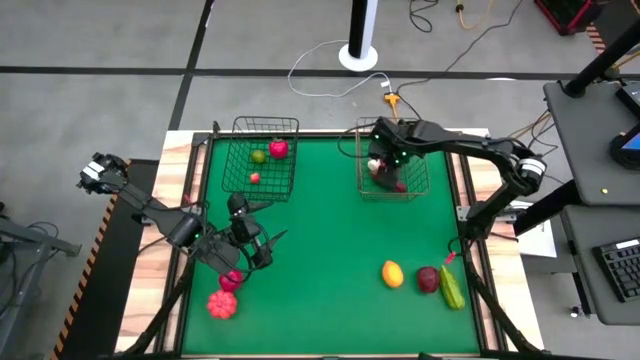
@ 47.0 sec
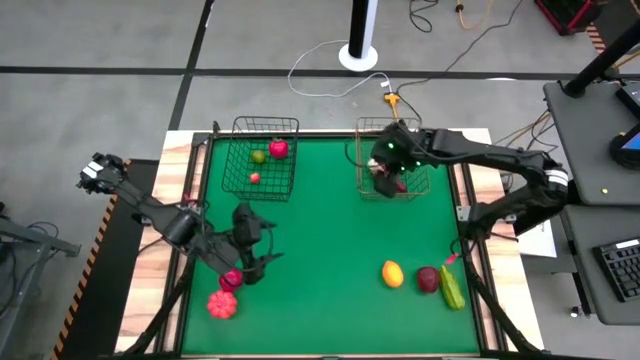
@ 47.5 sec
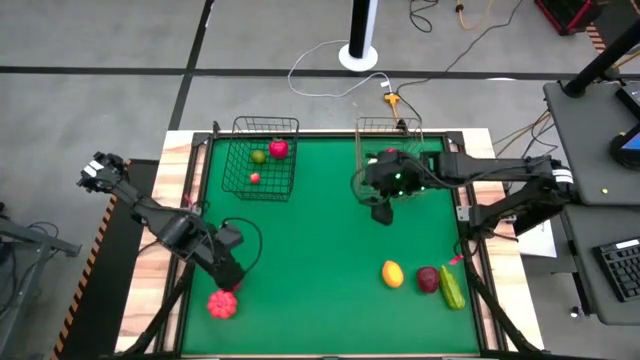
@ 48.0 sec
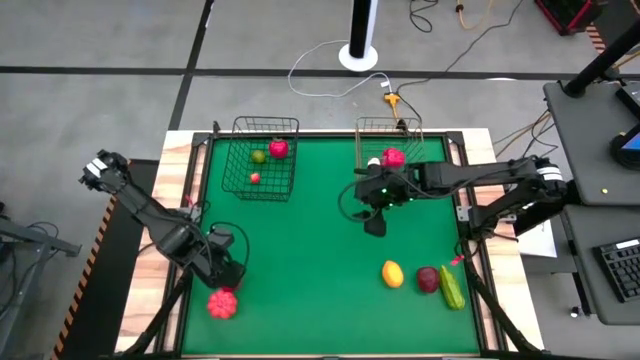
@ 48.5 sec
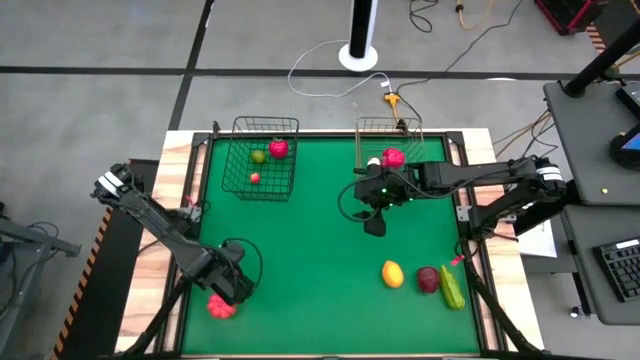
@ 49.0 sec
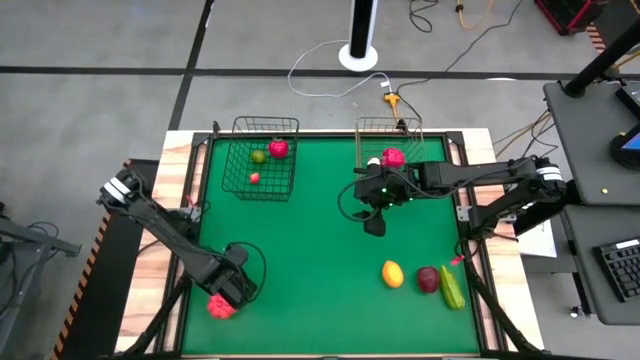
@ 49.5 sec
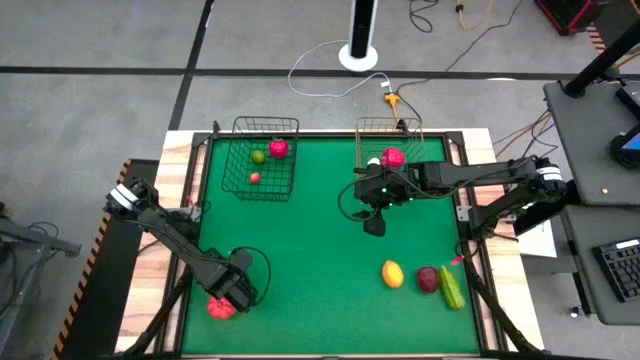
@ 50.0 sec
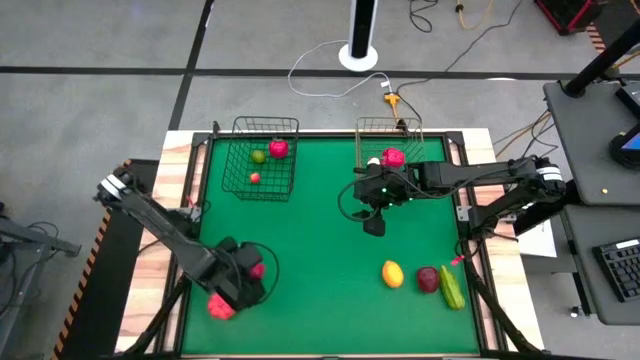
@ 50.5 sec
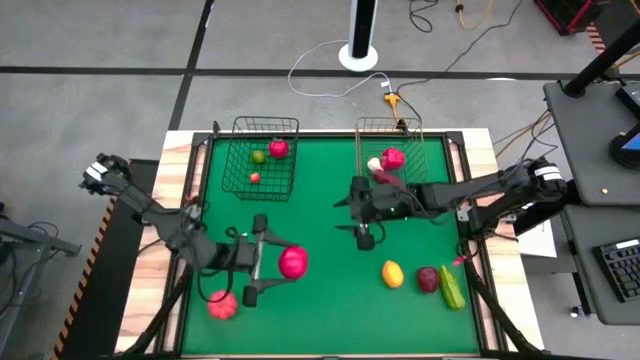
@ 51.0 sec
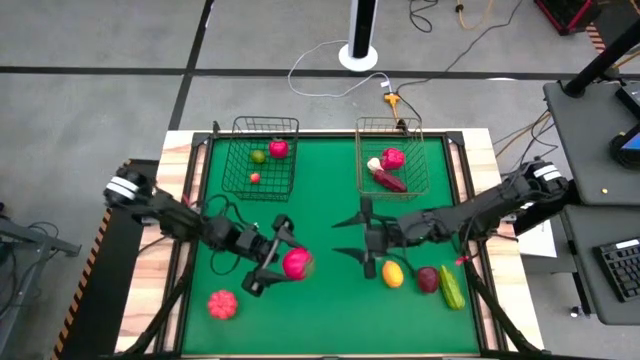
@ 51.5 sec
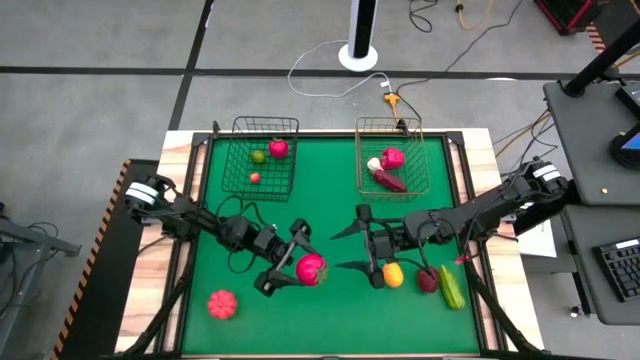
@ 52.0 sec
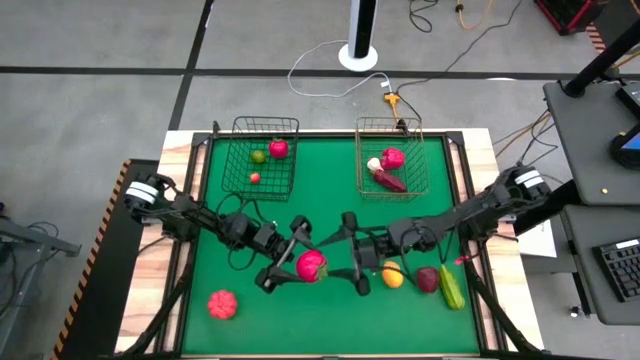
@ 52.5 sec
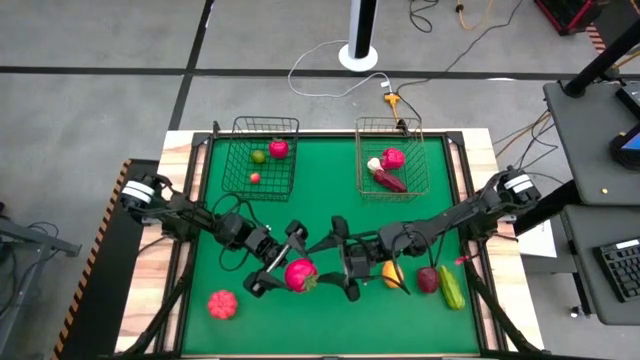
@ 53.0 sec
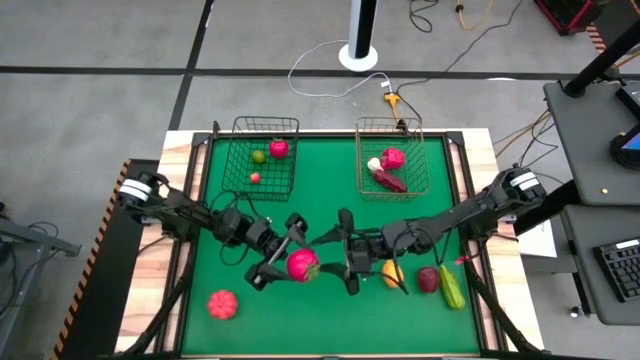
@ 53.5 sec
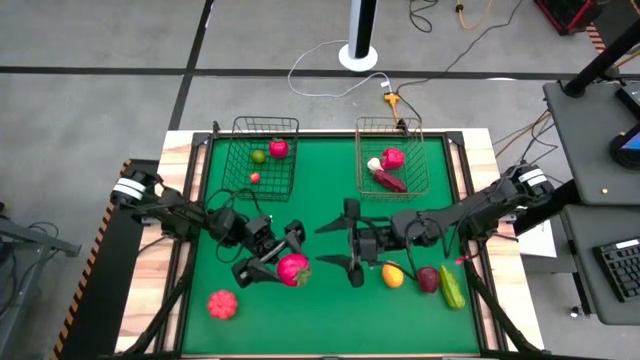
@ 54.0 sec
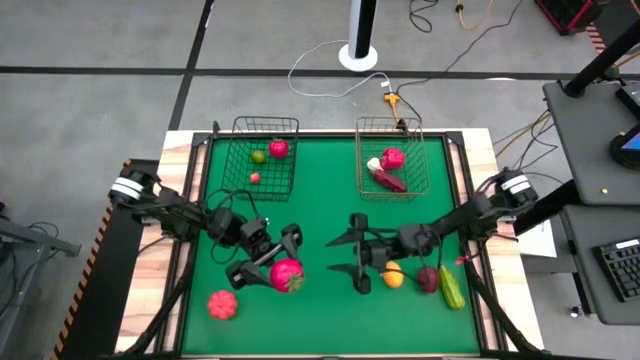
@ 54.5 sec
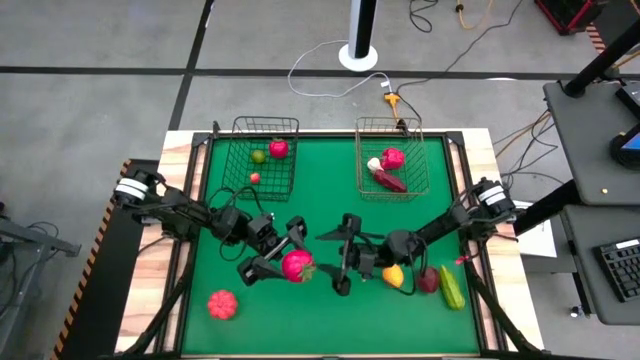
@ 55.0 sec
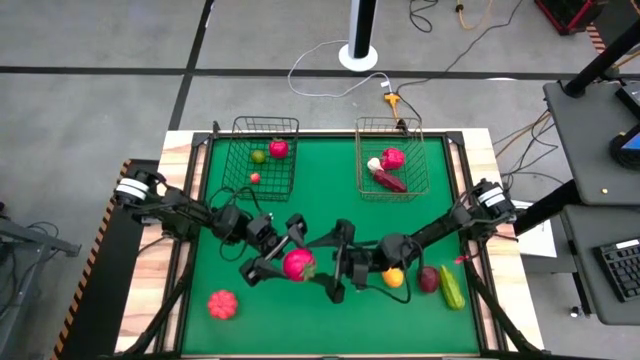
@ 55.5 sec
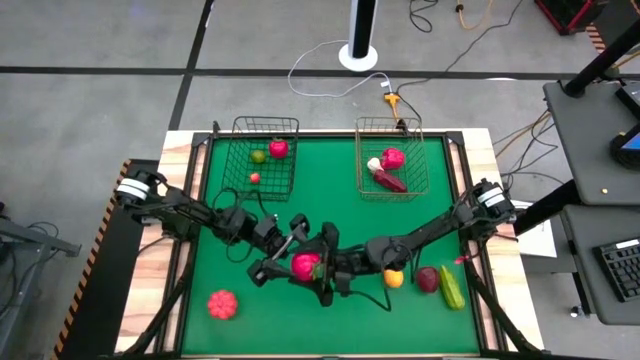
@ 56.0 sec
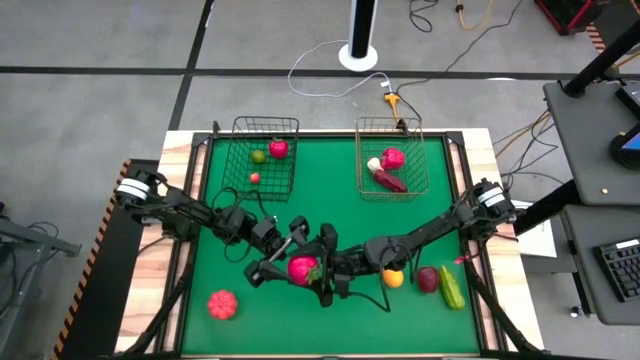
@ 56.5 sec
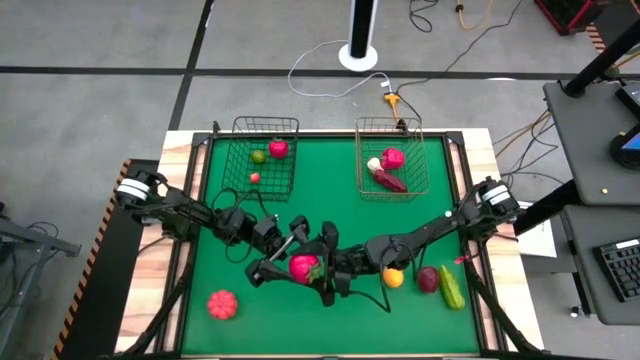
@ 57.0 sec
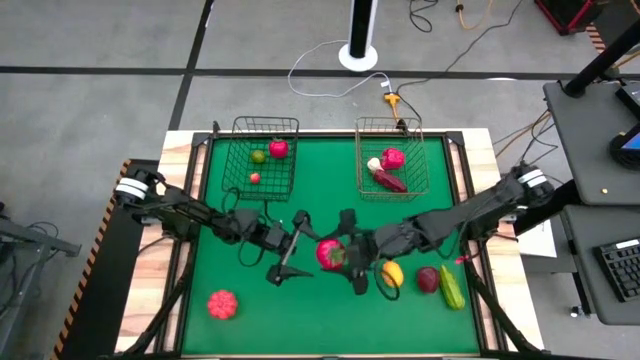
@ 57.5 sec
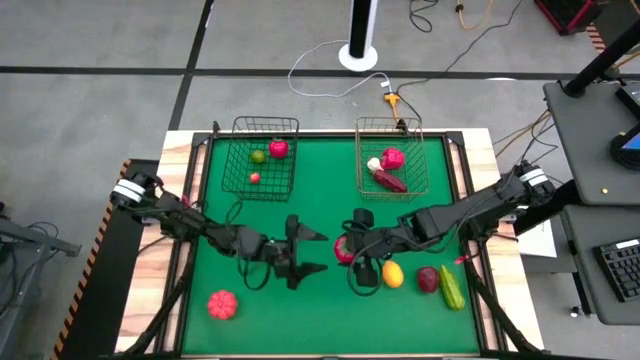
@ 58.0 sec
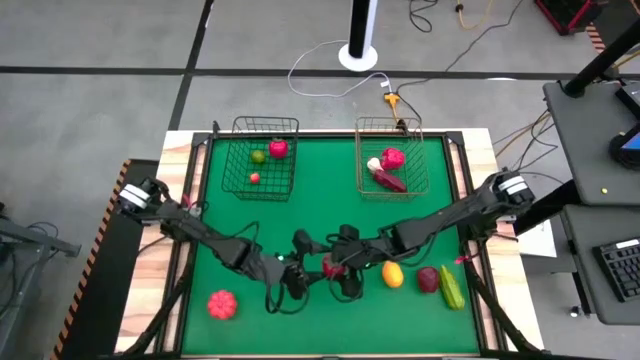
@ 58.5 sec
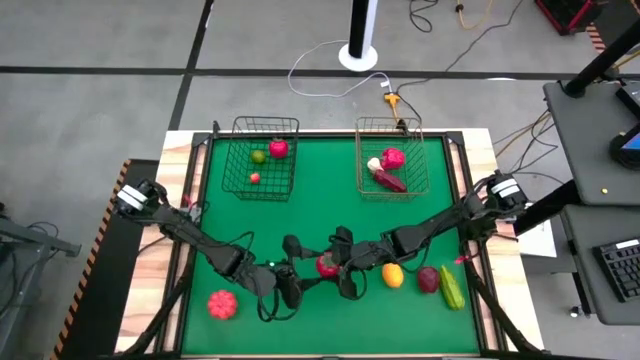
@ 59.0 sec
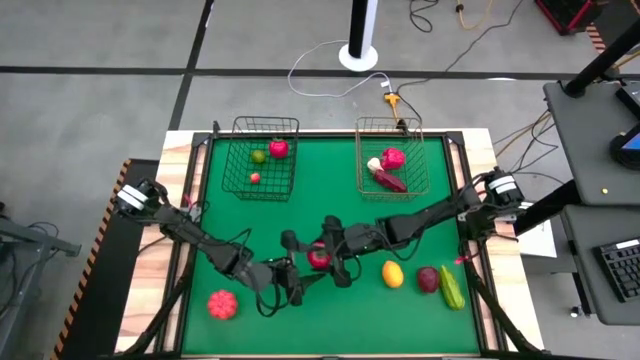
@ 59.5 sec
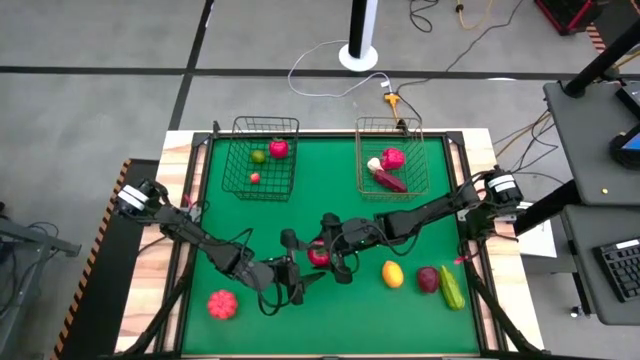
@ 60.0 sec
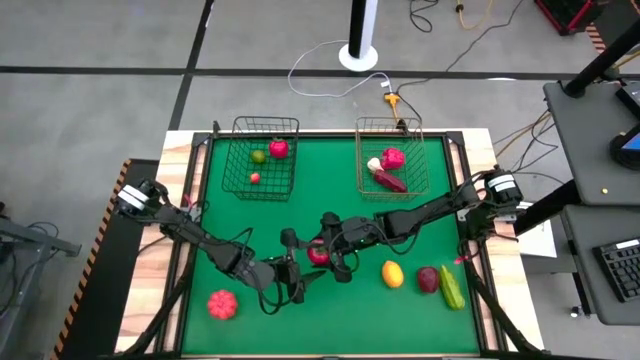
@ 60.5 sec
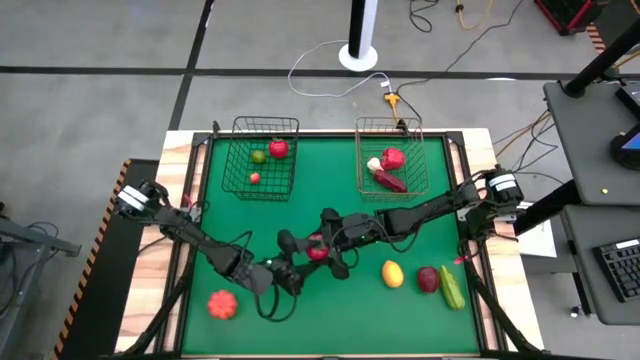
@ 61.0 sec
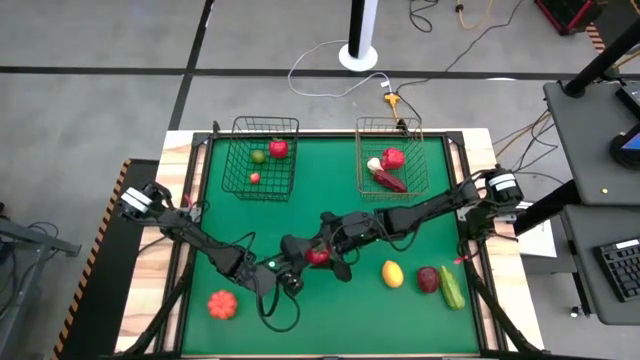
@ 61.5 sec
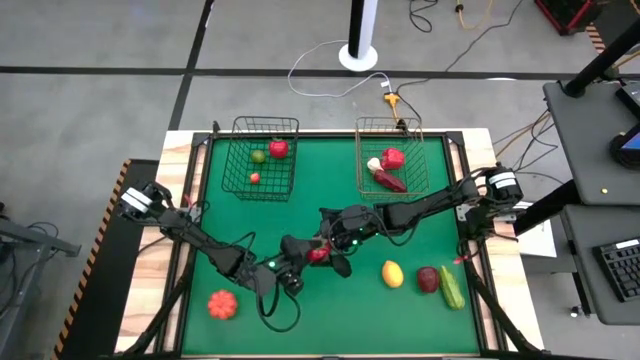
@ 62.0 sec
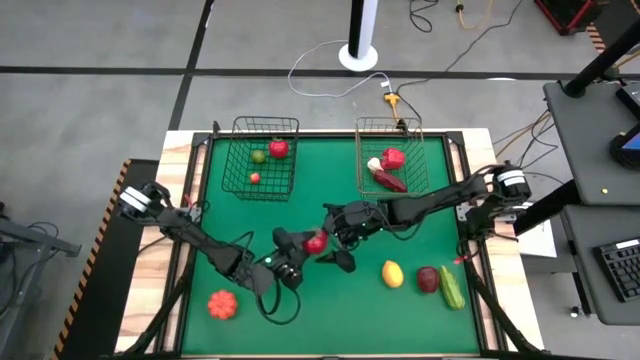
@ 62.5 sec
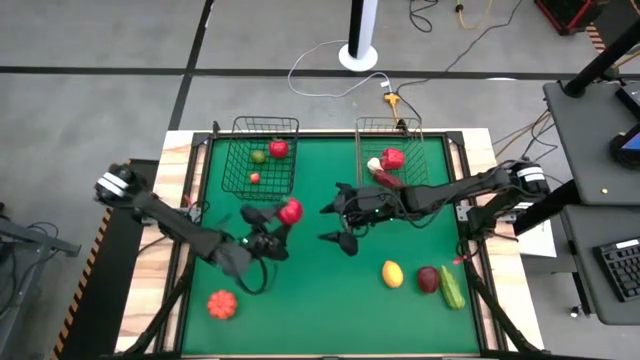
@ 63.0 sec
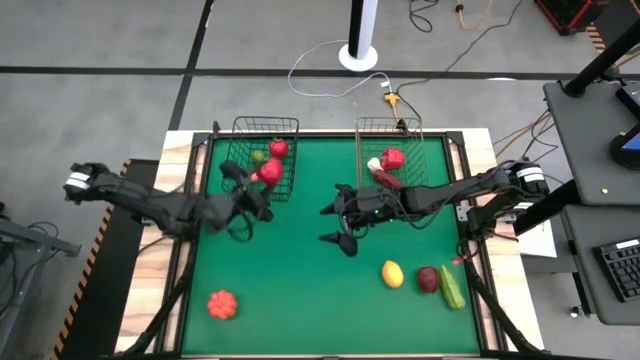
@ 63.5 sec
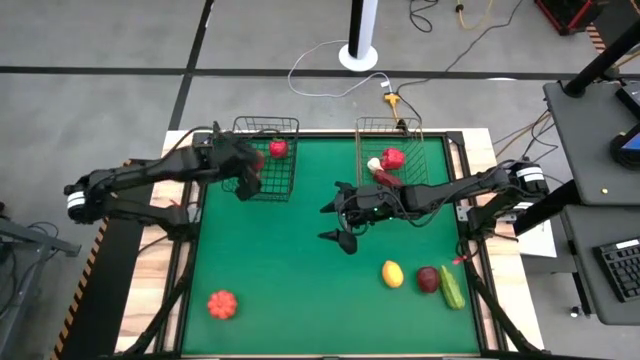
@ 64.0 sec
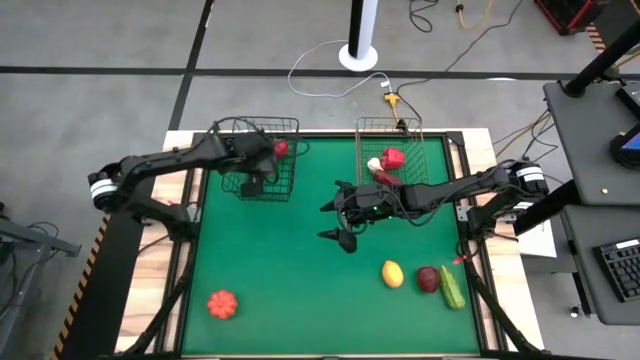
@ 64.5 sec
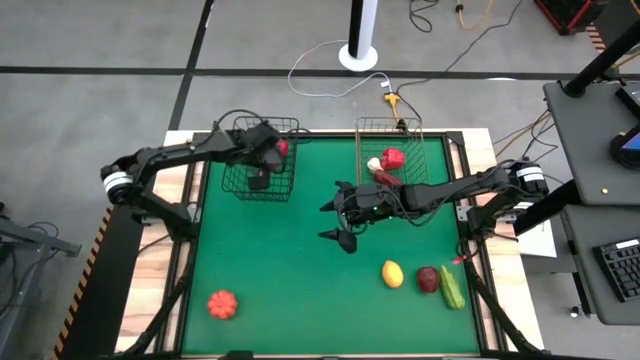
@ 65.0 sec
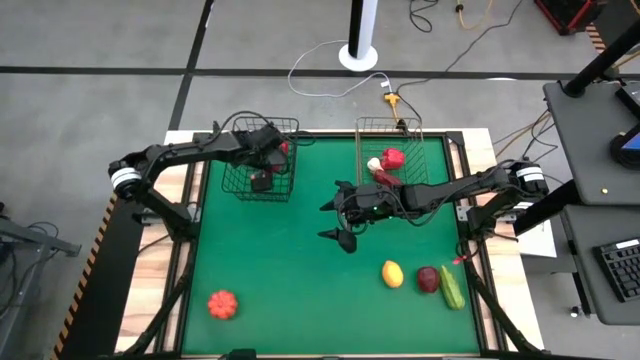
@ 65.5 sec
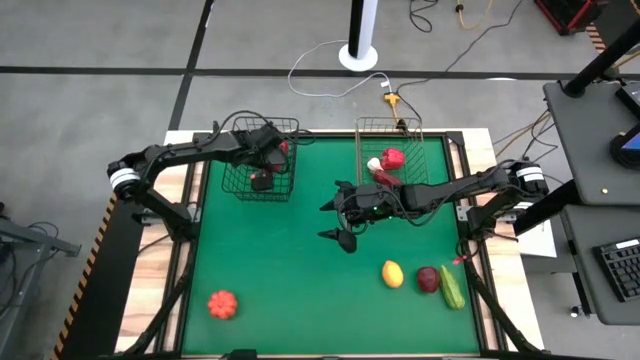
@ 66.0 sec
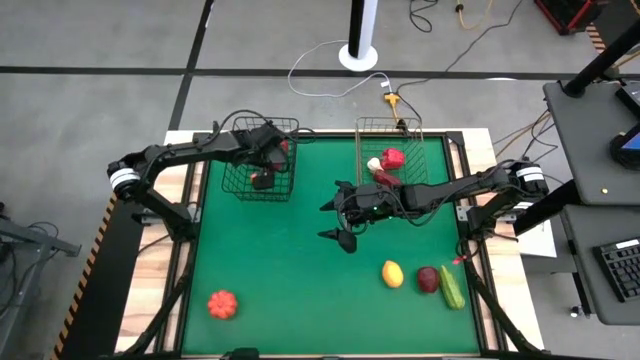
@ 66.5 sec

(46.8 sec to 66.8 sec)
Task: Sort produce into baskets
Put the tomato into the black wire basket

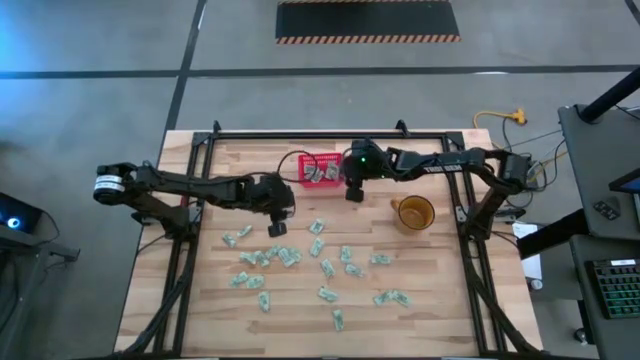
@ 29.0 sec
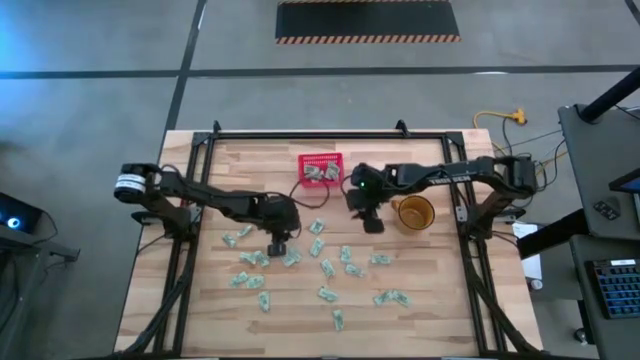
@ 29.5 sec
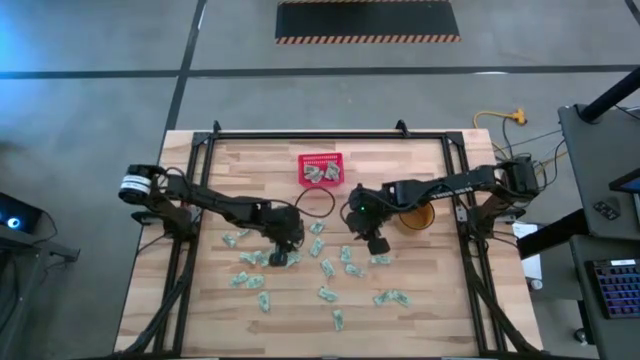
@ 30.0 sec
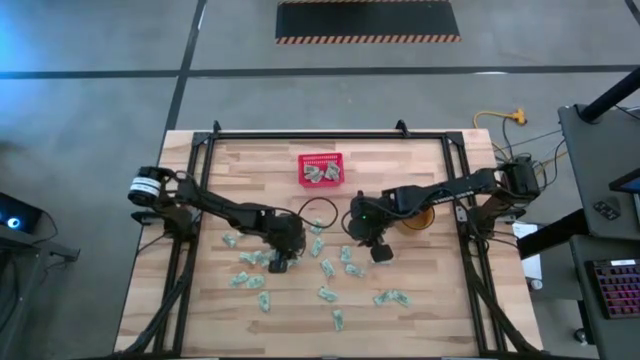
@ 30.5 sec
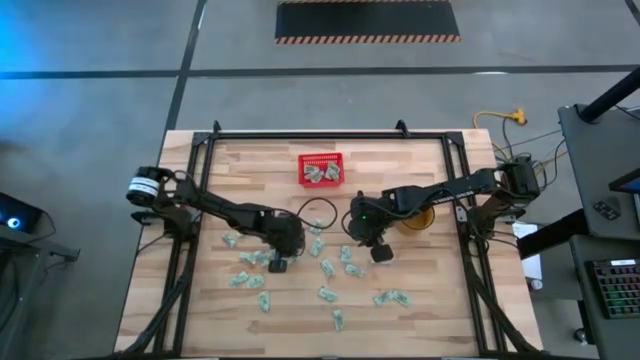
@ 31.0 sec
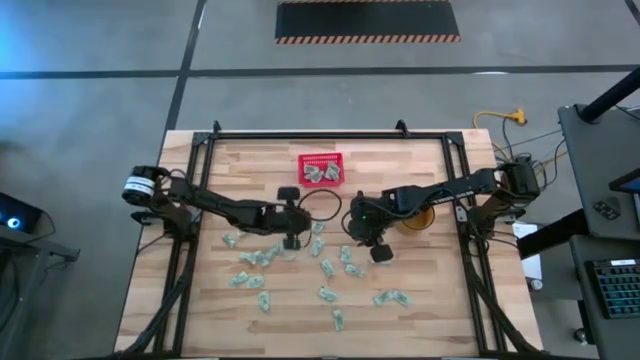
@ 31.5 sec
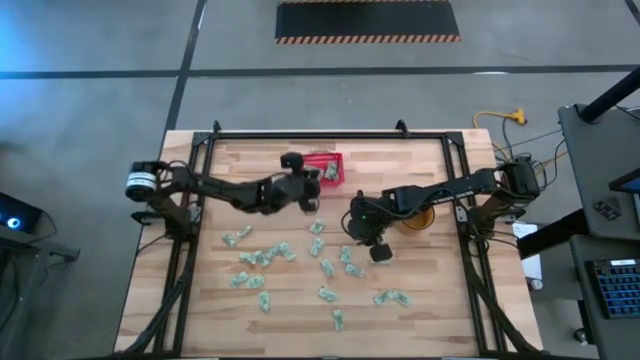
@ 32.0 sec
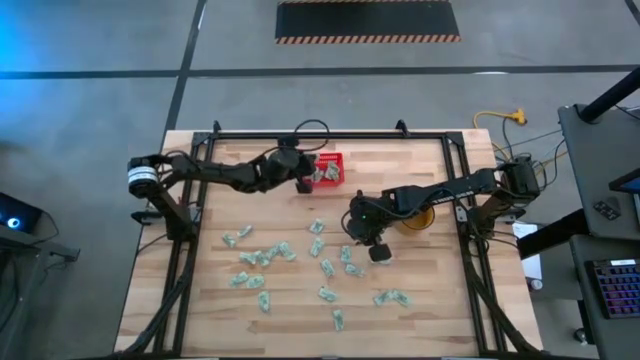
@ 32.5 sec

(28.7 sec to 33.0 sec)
Task: Pick and place Stevia / Truvia into bins
Put the white stevia packet into the red bin
